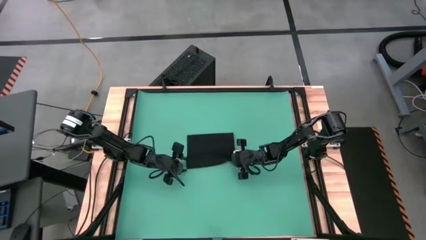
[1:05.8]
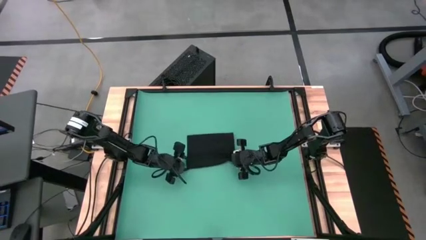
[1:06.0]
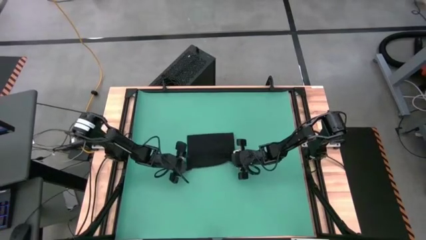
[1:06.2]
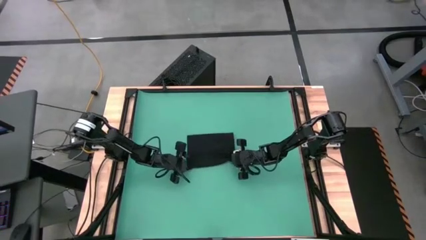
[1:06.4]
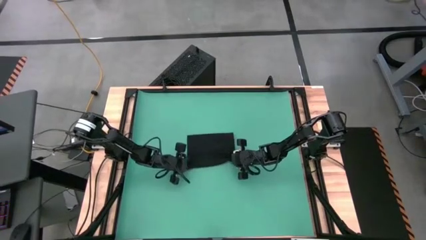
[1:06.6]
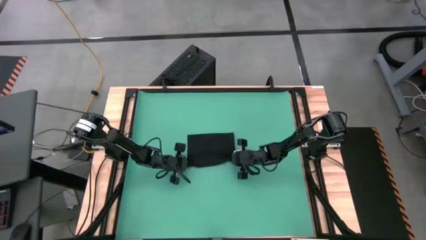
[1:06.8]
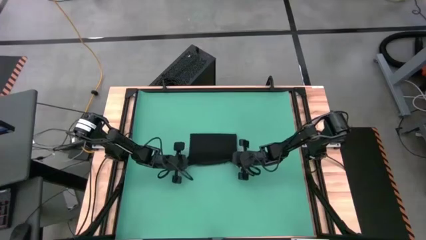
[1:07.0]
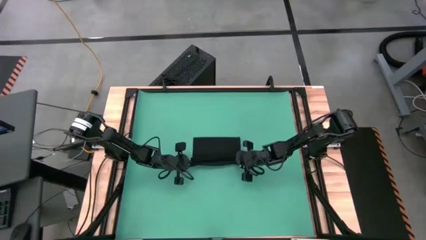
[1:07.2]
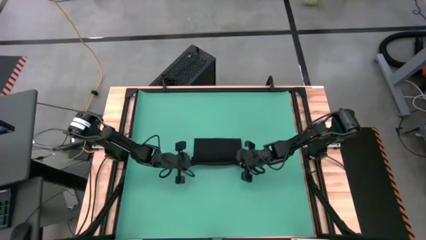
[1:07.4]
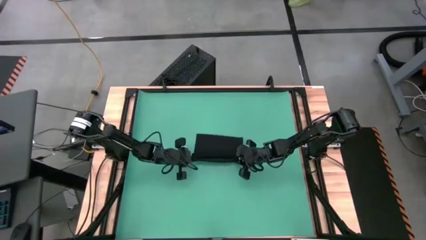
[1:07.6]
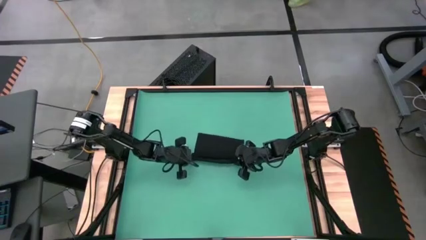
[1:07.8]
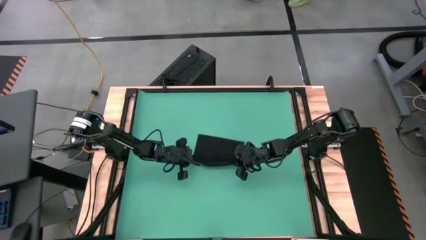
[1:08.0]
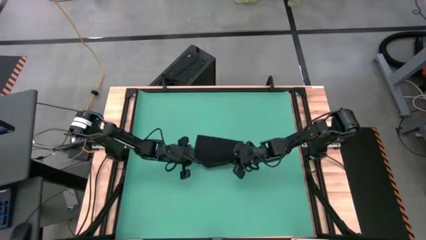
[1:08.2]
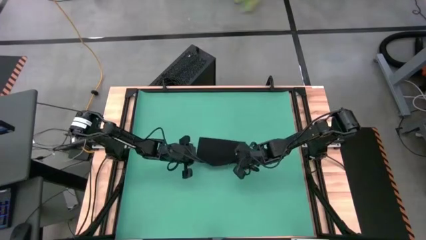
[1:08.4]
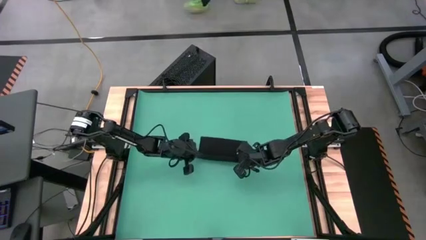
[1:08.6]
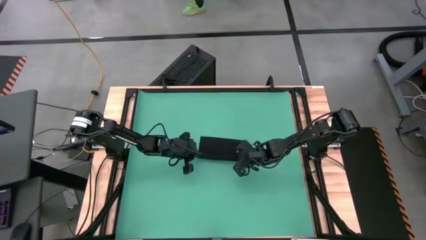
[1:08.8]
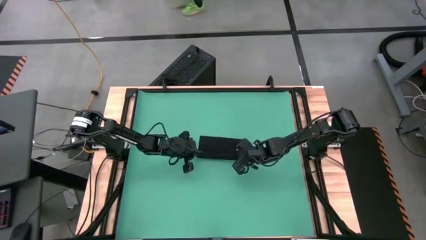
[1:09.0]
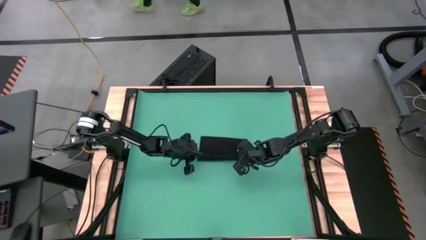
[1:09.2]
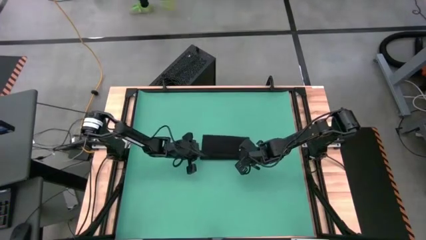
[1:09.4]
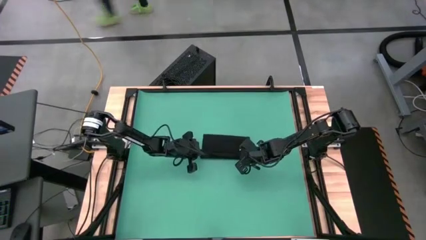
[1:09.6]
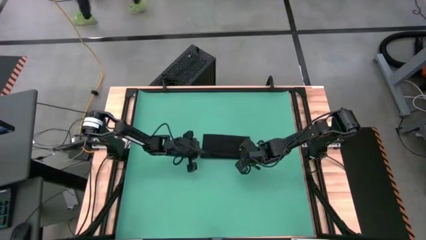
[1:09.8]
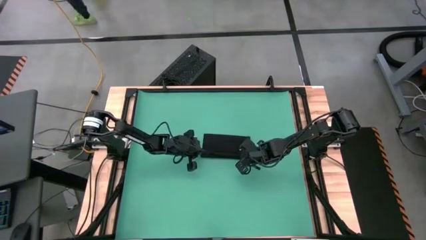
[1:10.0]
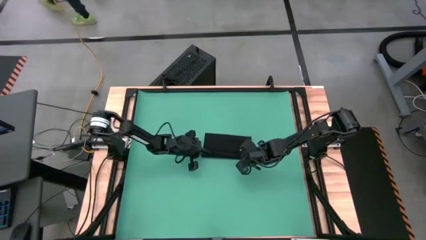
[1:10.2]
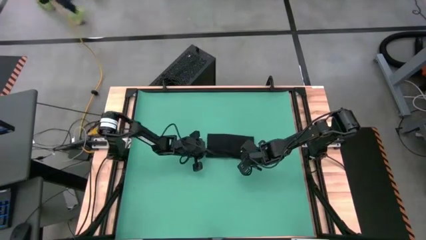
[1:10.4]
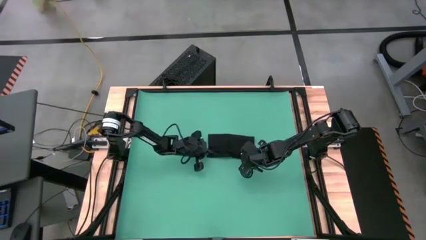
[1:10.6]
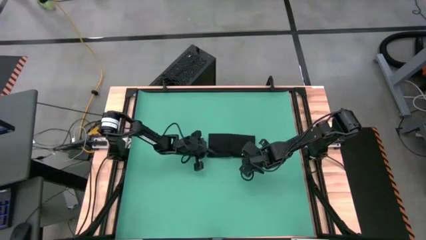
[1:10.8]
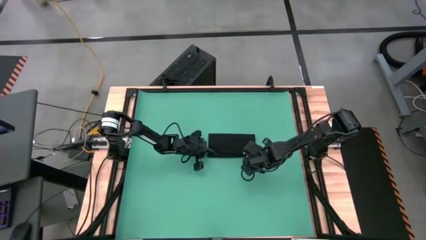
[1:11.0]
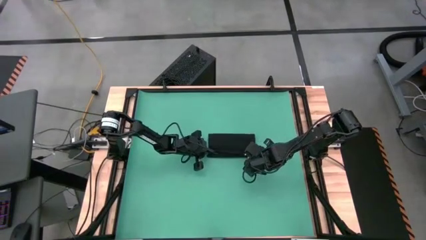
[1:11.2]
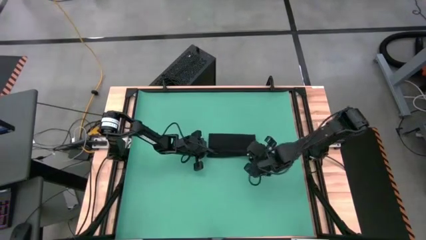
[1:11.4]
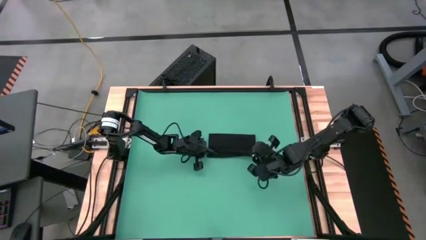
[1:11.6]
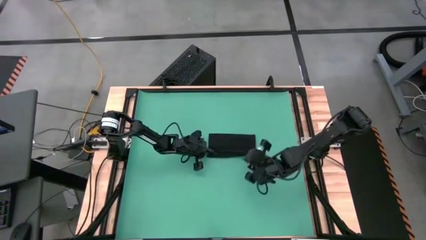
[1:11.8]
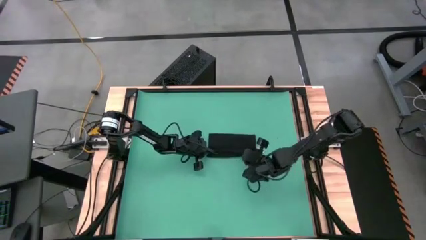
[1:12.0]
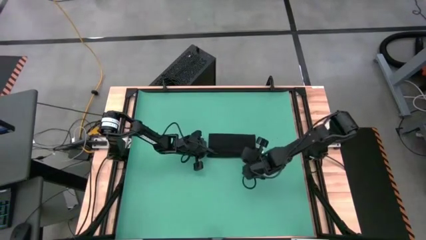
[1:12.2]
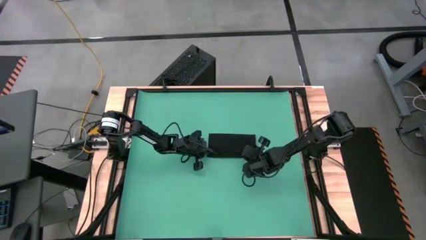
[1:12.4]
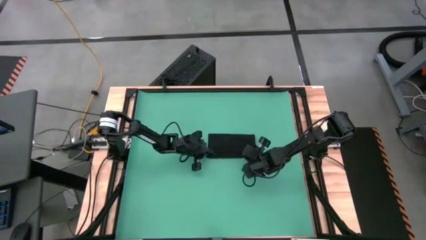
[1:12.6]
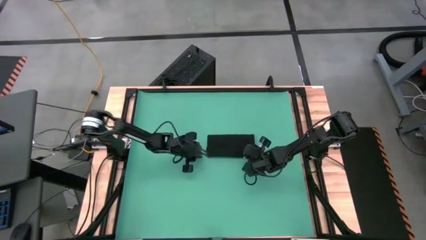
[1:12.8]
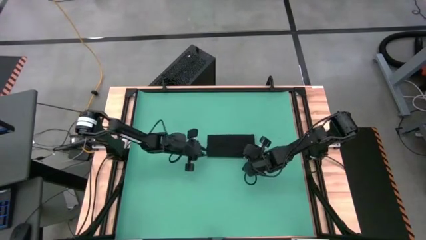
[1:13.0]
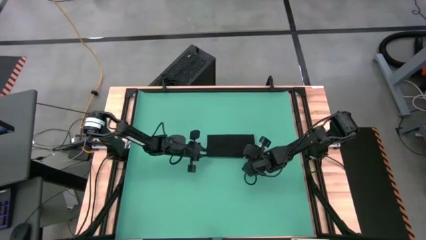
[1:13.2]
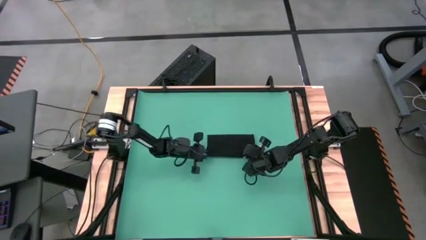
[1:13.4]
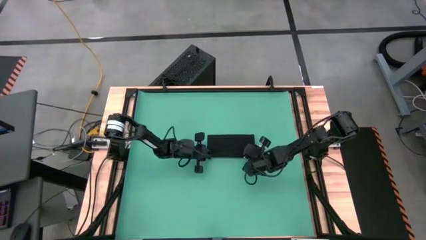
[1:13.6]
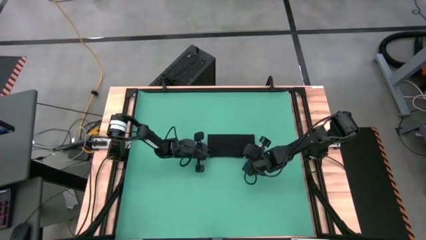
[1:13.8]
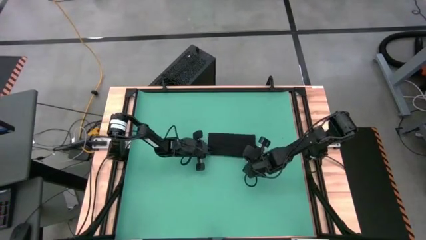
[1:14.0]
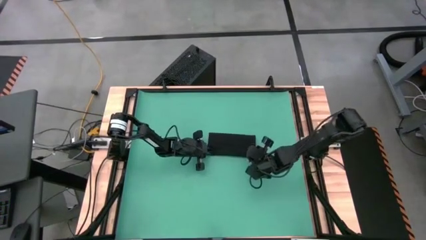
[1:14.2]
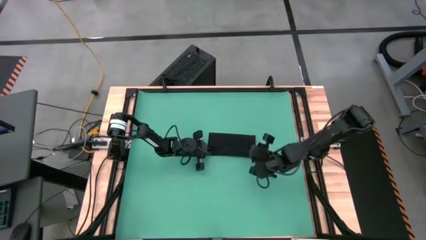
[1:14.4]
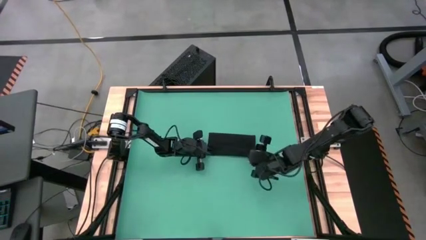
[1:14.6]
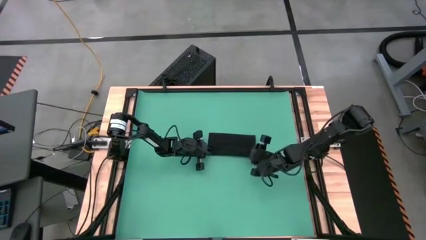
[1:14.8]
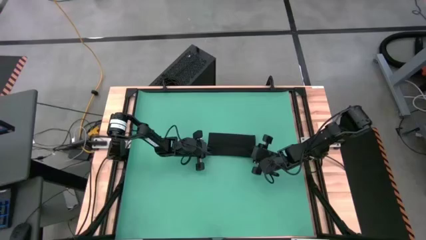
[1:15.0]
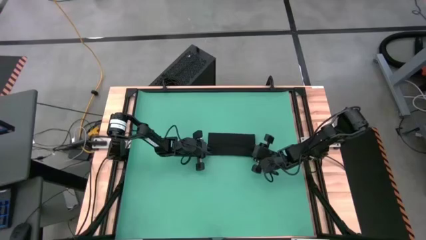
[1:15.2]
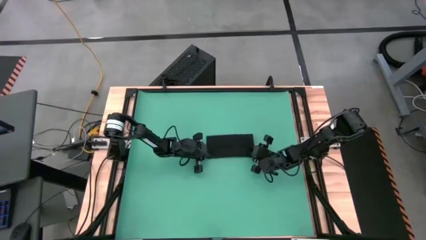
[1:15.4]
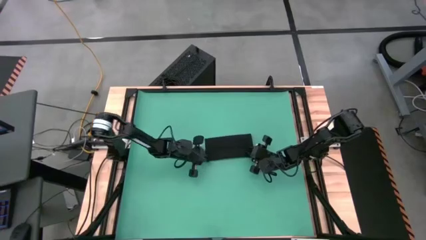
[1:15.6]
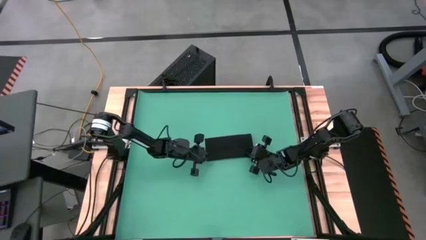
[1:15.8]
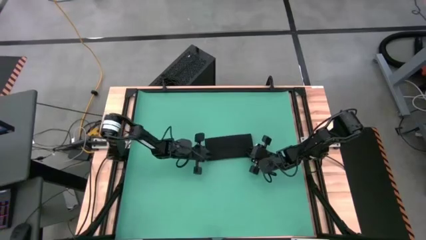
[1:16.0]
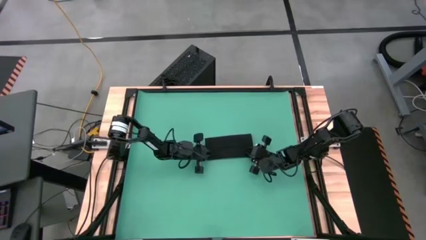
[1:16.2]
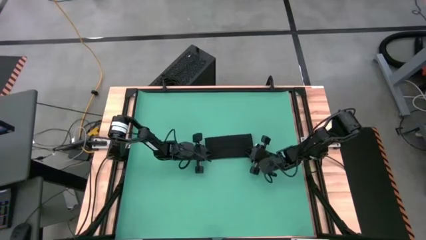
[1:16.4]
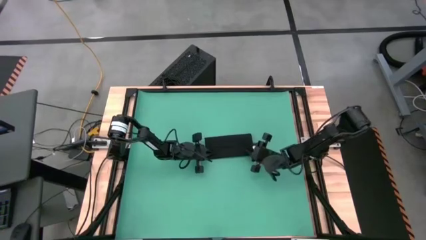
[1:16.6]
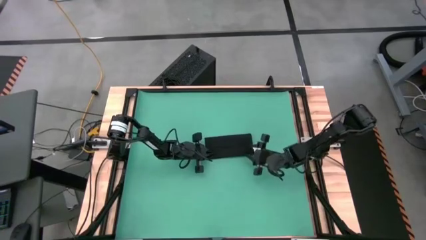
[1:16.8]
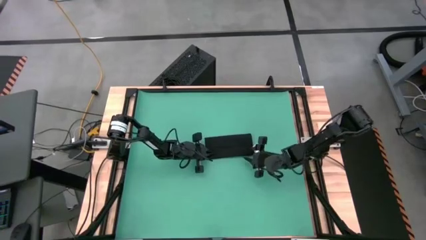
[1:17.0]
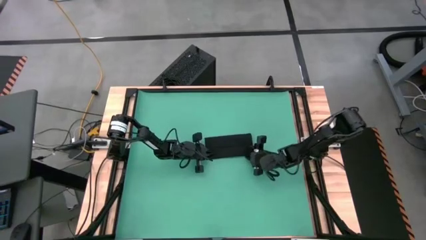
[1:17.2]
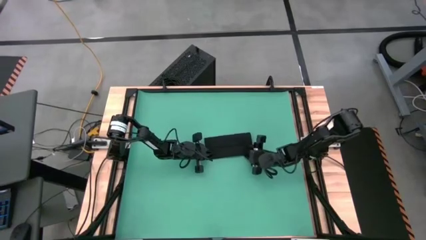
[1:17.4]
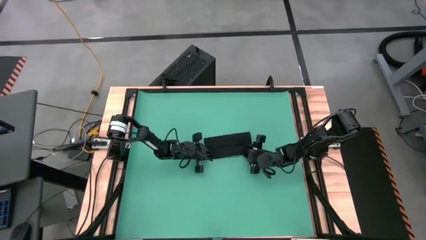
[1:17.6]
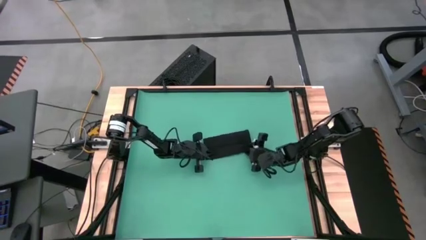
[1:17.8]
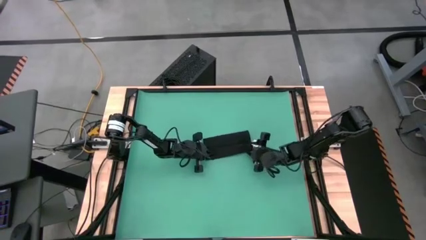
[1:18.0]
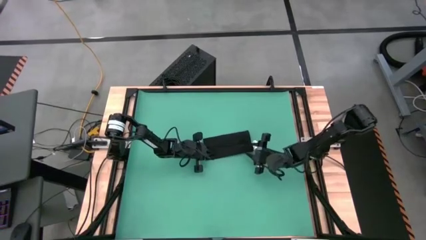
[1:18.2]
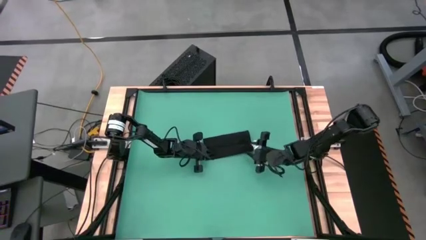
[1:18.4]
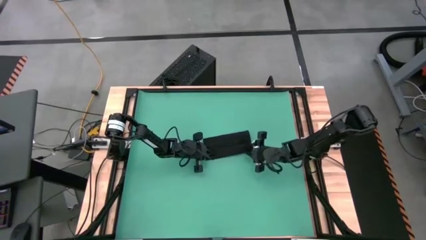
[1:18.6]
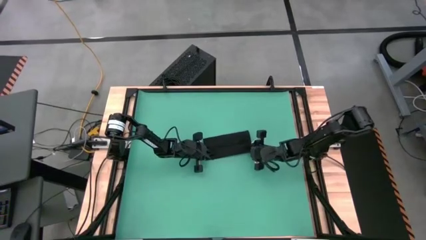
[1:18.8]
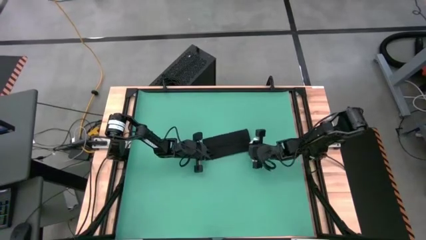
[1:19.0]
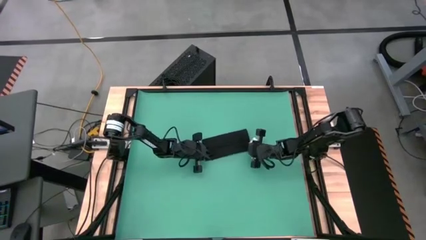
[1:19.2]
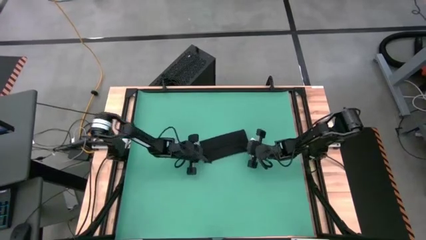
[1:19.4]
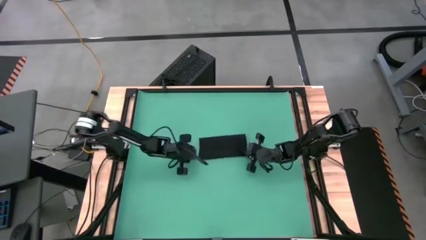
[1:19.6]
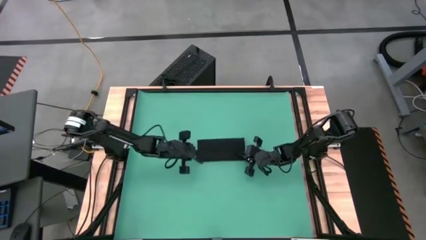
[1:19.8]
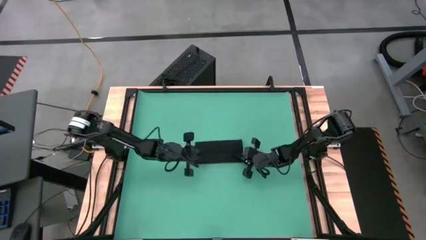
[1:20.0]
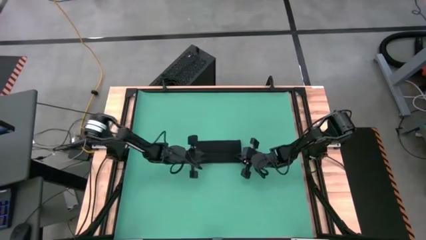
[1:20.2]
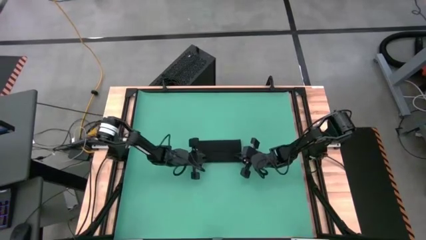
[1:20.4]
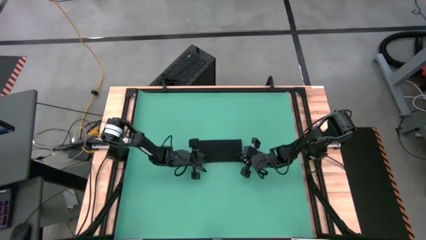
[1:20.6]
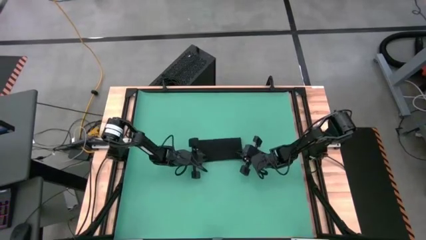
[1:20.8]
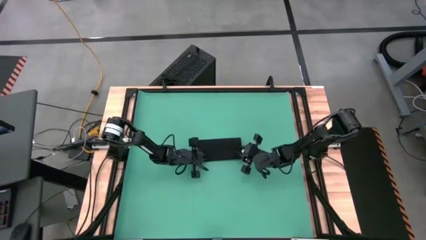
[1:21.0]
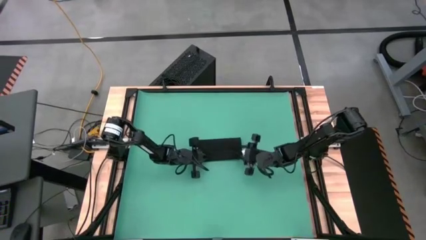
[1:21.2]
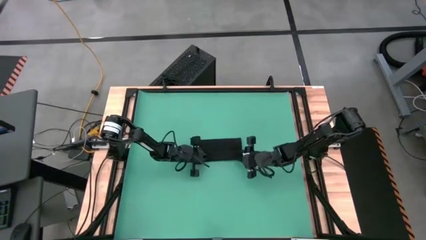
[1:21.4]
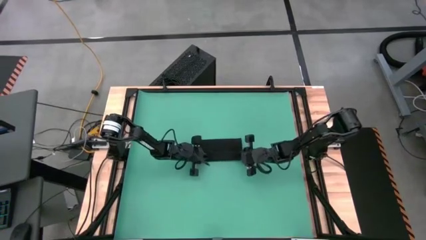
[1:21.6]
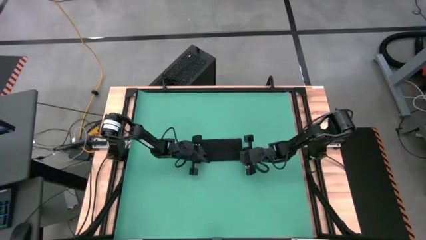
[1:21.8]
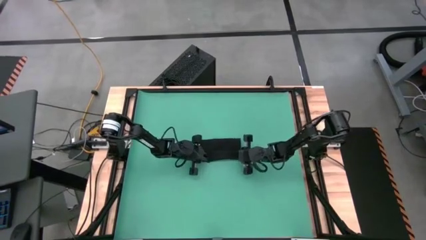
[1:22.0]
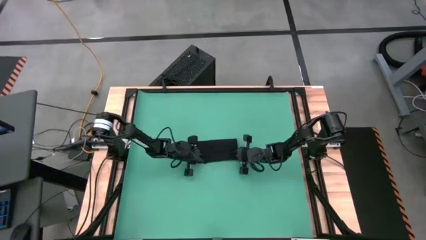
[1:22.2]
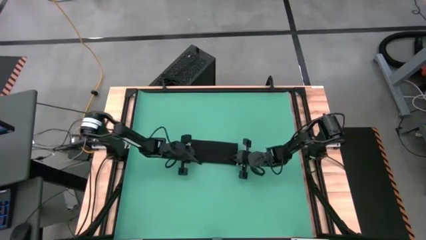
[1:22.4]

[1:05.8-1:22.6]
Task: Roll towel
Roll the brown towel
